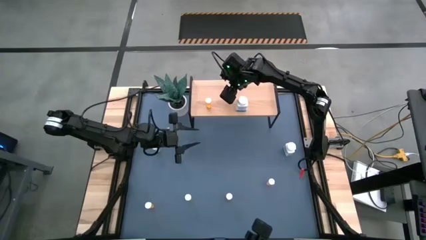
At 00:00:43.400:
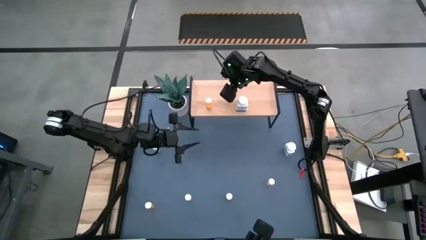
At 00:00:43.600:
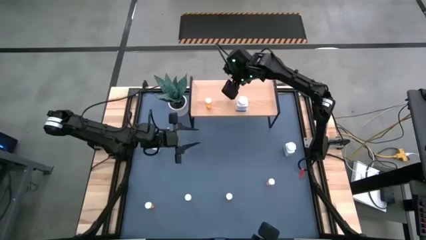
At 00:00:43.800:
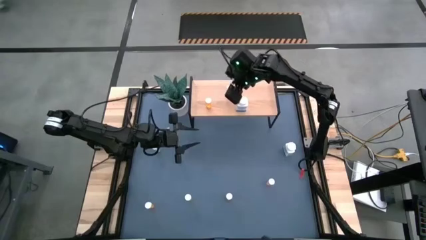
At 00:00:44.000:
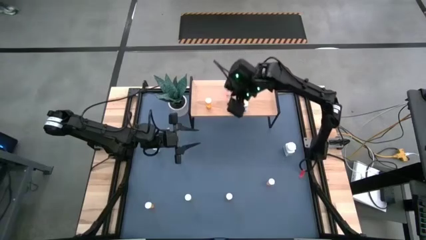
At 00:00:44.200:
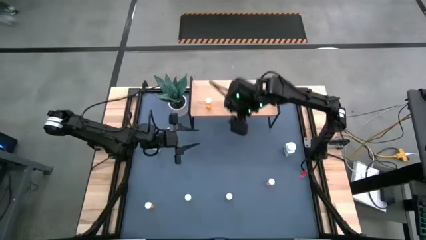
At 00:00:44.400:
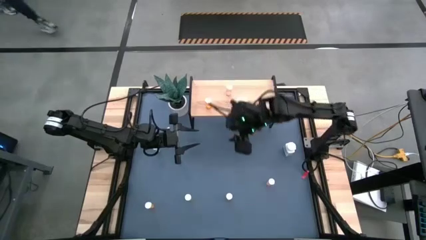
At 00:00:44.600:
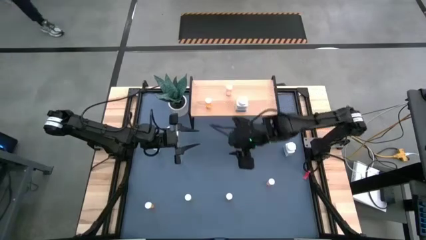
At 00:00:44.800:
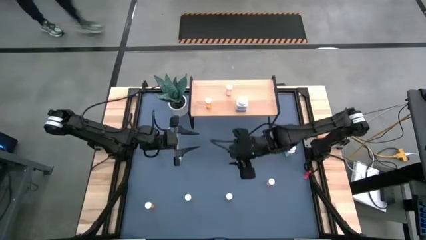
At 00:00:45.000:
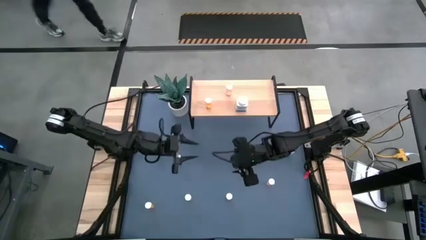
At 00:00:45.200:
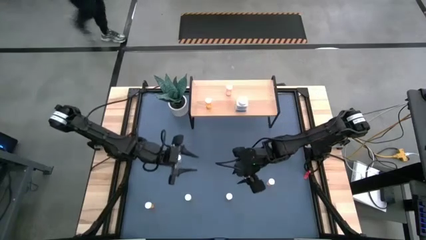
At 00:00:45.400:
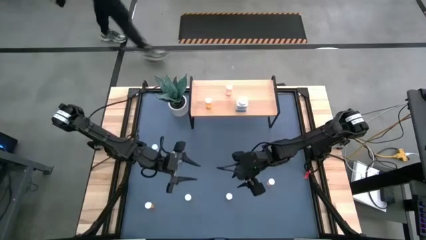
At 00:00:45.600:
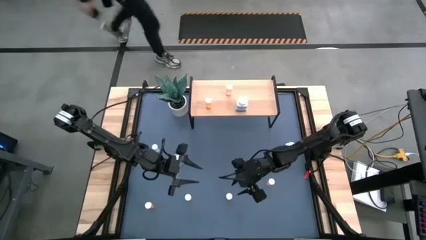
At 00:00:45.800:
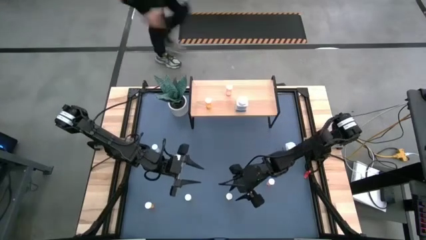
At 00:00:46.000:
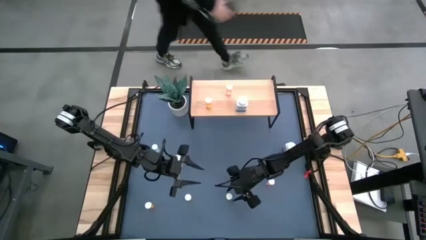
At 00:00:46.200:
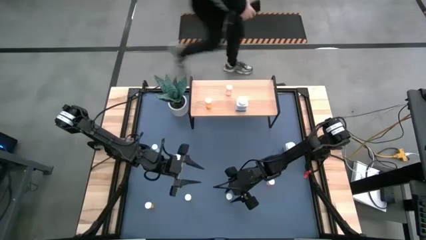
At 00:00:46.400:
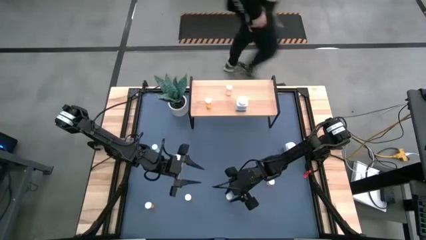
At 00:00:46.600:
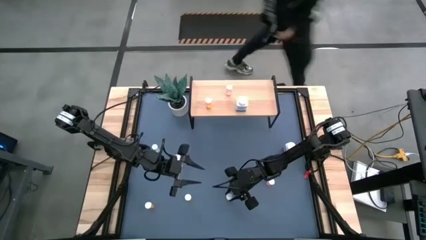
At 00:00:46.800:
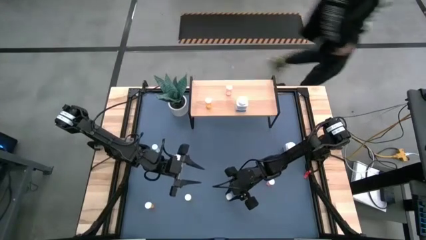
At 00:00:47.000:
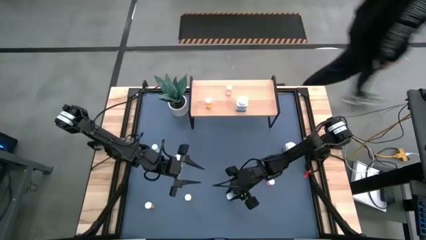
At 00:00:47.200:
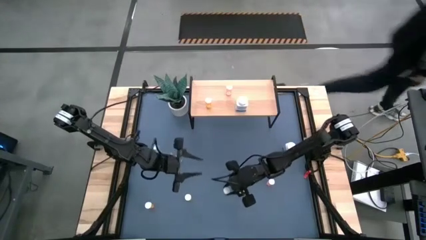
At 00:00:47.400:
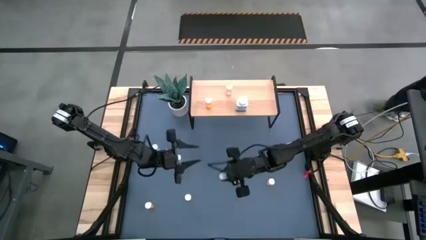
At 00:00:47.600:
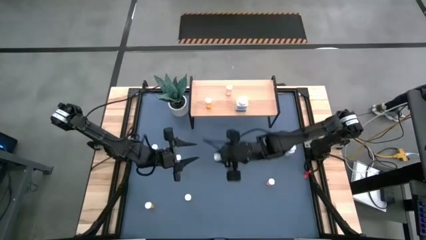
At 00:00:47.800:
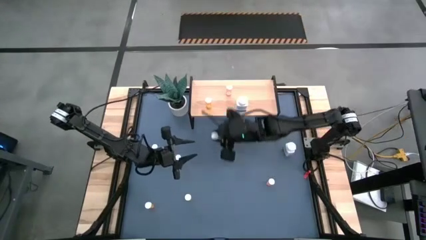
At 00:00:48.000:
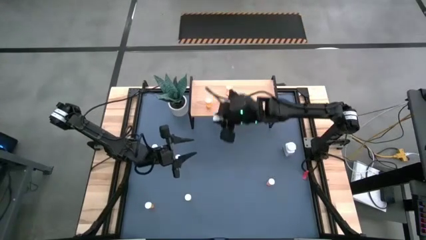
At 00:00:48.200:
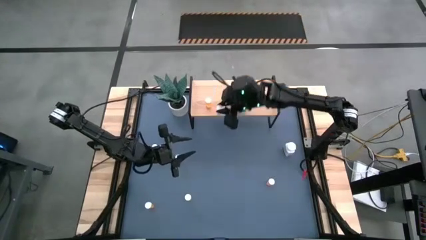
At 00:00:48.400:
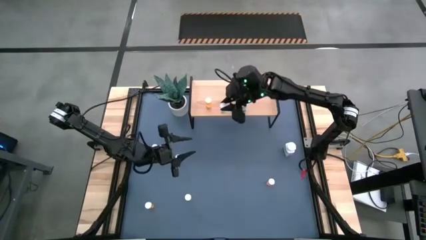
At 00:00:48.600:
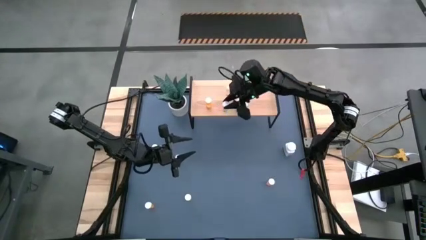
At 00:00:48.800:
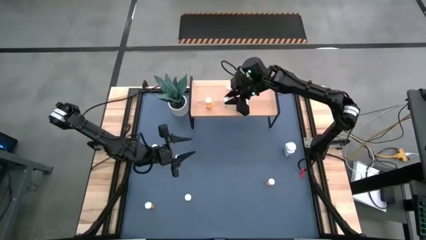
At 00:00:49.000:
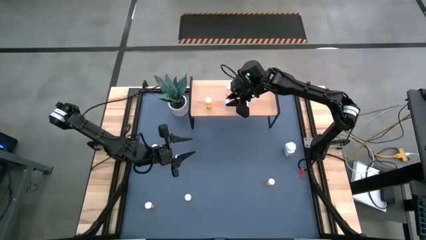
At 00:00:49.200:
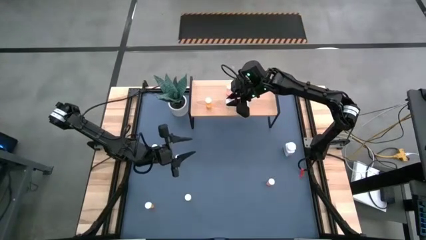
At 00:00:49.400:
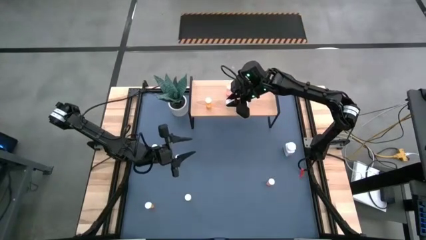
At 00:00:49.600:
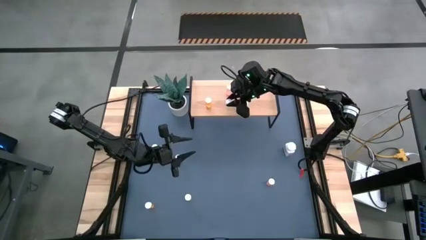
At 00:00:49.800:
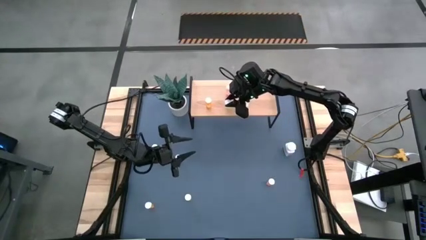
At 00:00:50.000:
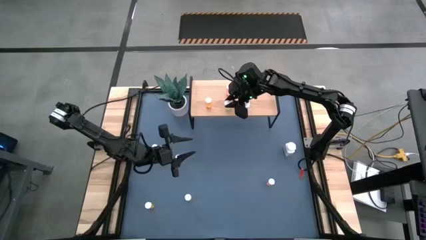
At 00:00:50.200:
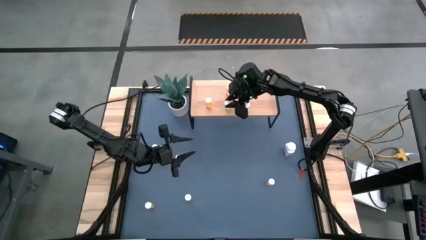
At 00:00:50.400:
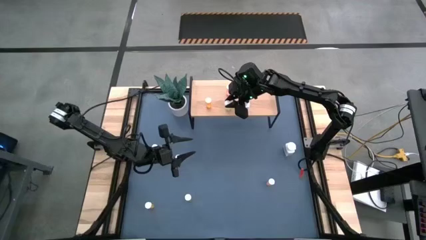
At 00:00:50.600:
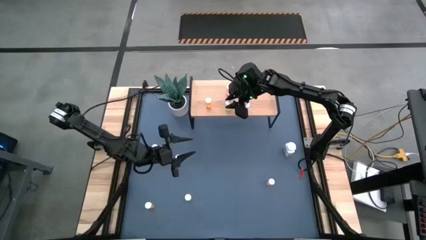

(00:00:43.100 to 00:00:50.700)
Task: Pick and place medicine bottles onto shelf by color
Put the right yellow medicine bottle on the shelf

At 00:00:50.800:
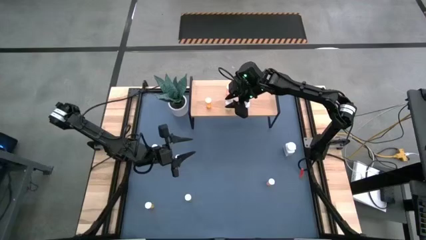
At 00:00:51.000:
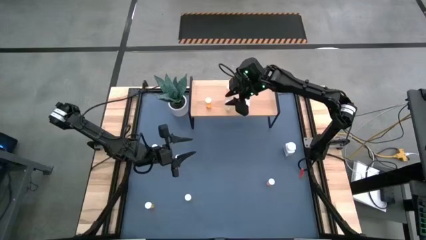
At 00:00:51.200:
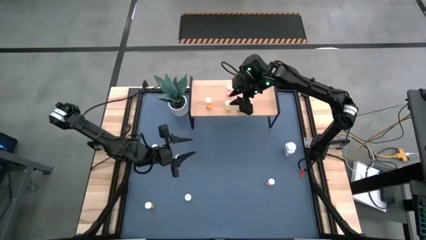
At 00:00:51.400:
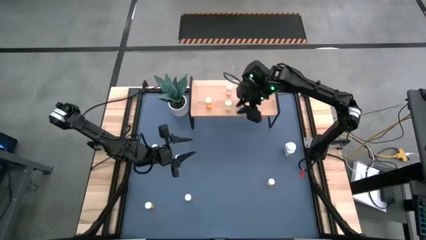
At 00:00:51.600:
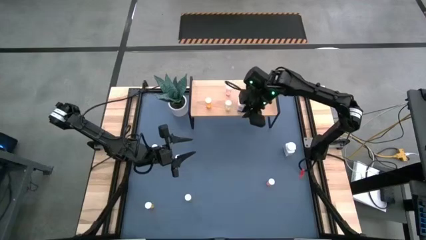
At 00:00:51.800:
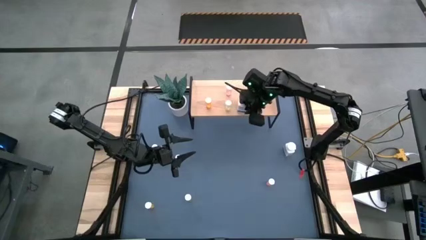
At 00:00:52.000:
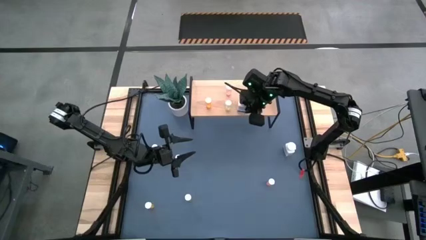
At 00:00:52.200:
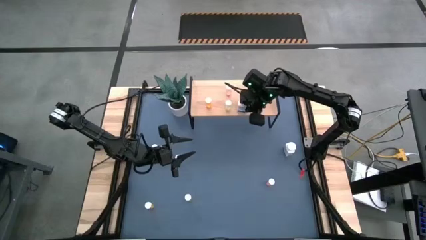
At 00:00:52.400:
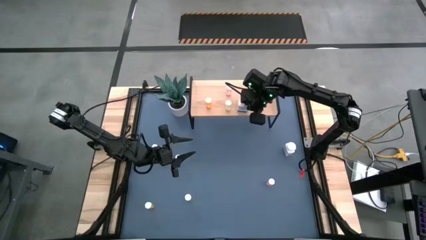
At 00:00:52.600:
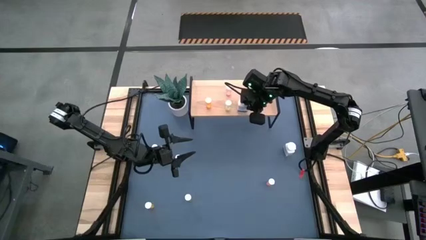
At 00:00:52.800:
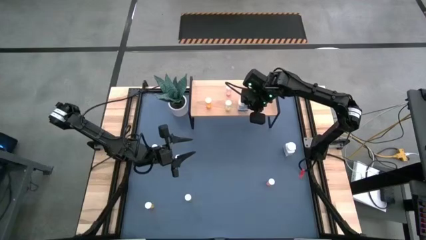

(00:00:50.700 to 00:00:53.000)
Adjust the white medicine bottle on the shelf

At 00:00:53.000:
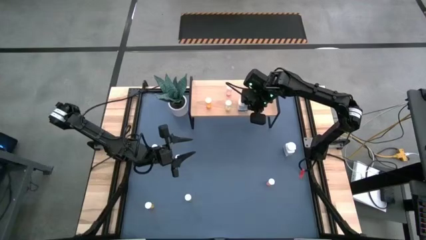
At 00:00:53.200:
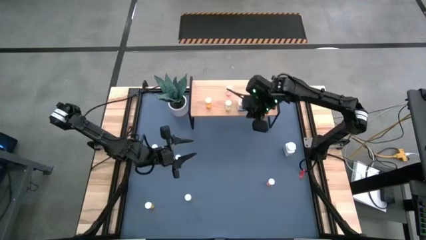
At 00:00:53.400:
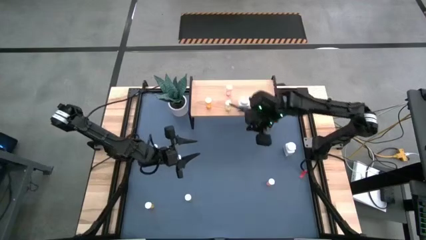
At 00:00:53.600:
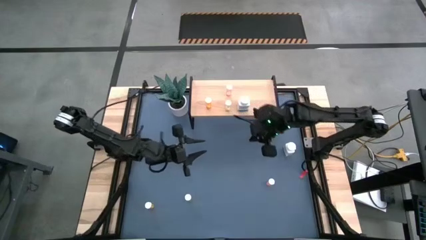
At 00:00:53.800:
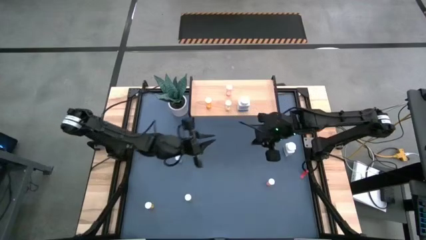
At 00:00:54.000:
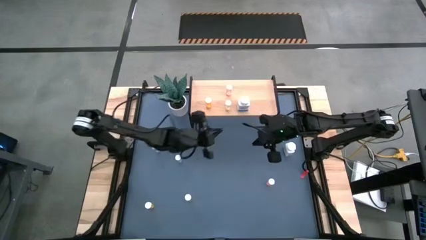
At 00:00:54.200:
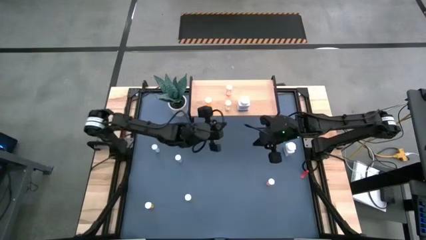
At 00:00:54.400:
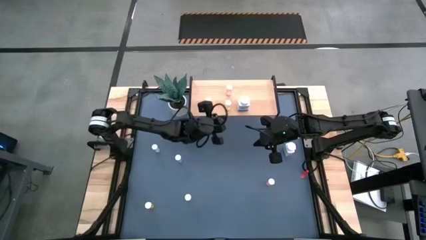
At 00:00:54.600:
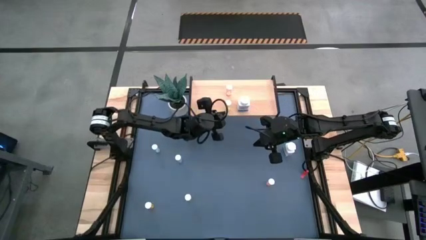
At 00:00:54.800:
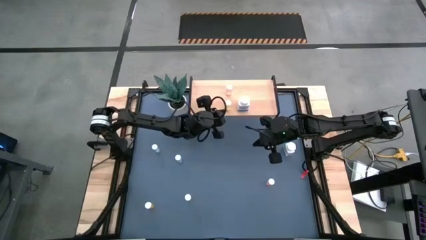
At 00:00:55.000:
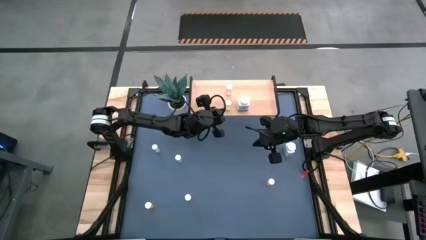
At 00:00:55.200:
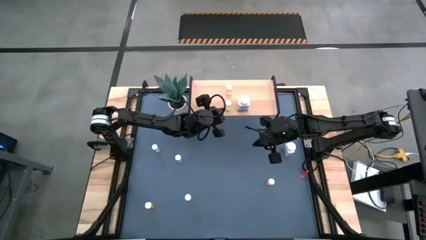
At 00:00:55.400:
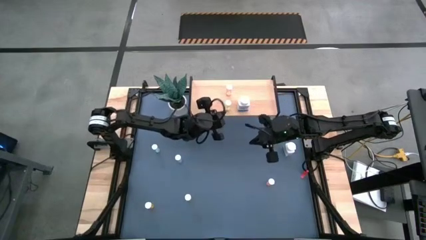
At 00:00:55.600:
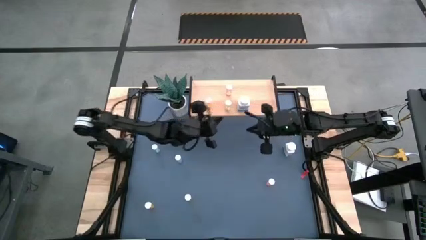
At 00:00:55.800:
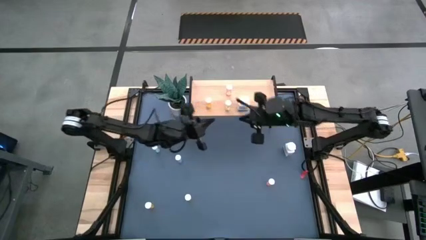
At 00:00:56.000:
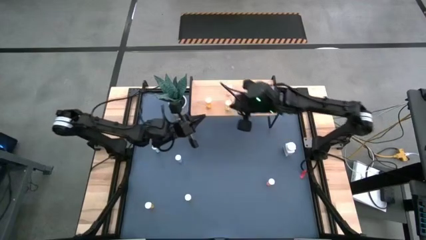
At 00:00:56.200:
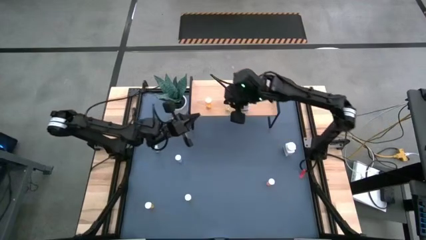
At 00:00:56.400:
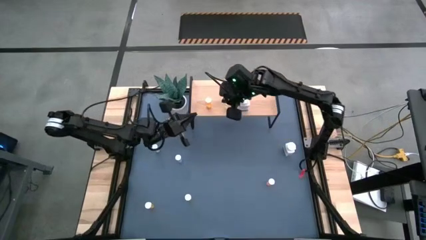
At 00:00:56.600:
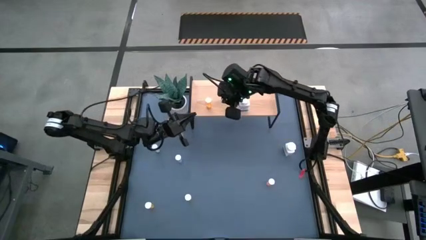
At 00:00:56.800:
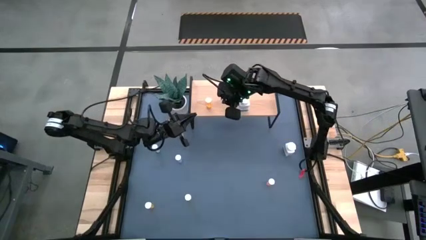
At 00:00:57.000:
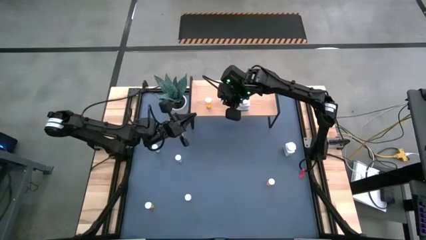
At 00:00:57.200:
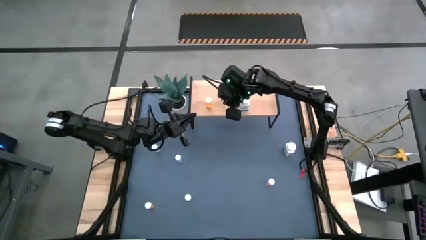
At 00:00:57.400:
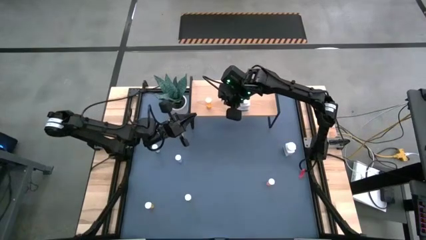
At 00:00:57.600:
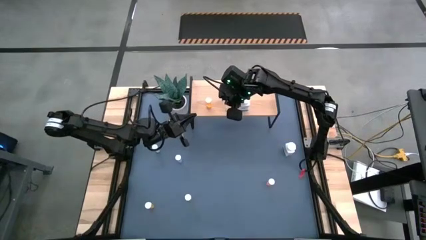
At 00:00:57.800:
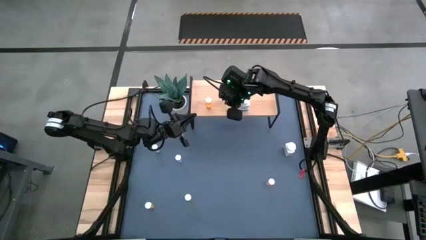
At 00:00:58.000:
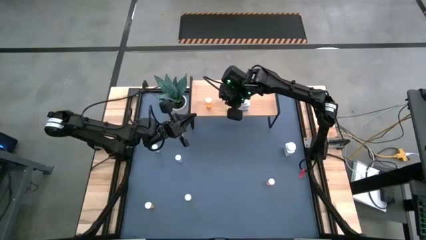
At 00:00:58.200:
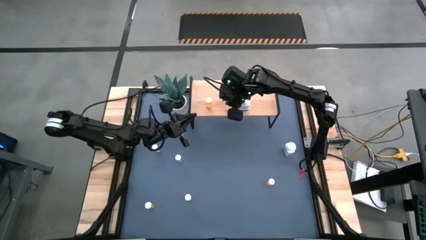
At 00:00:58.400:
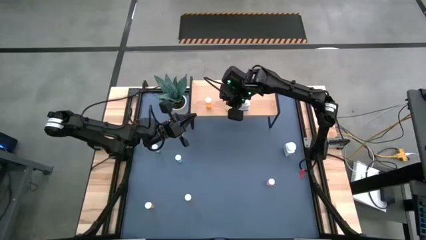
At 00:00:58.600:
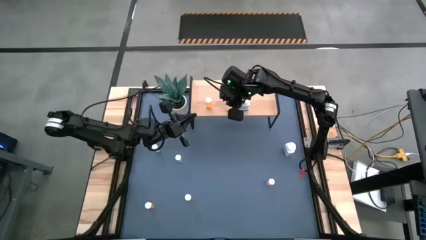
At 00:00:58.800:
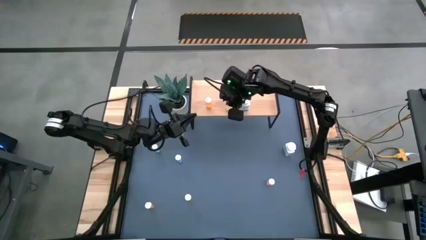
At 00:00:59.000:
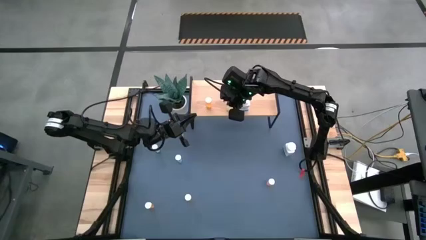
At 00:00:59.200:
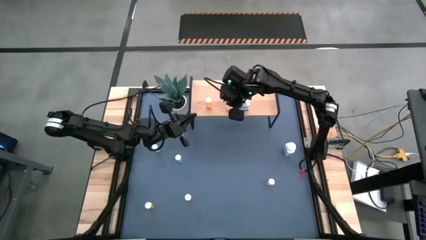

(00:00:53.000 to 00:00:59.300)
Adjust the yellow medicine bottle on the shelf
